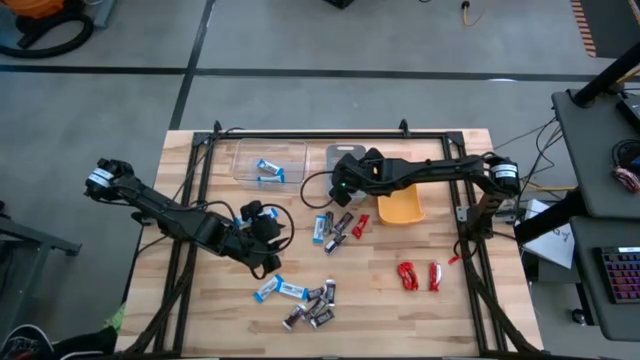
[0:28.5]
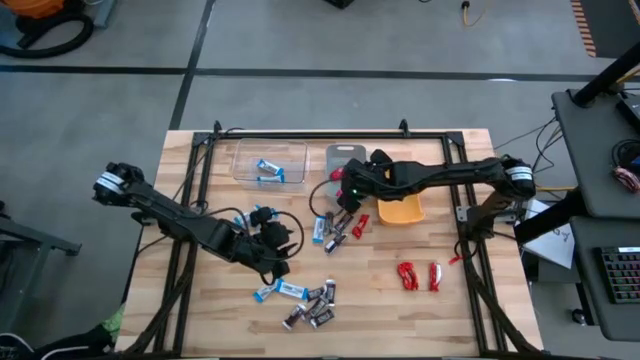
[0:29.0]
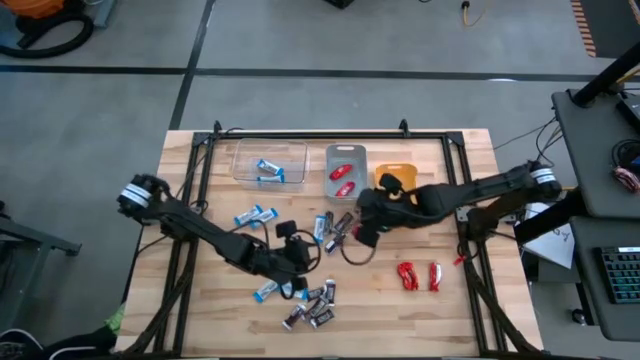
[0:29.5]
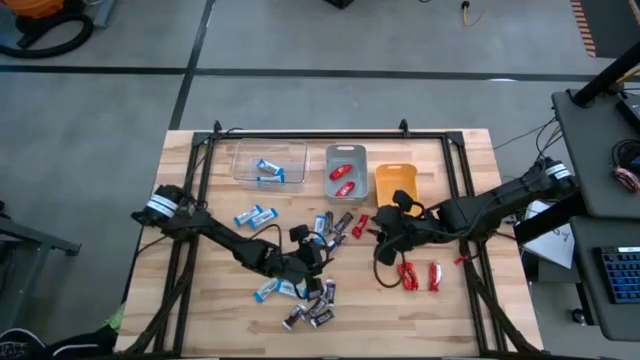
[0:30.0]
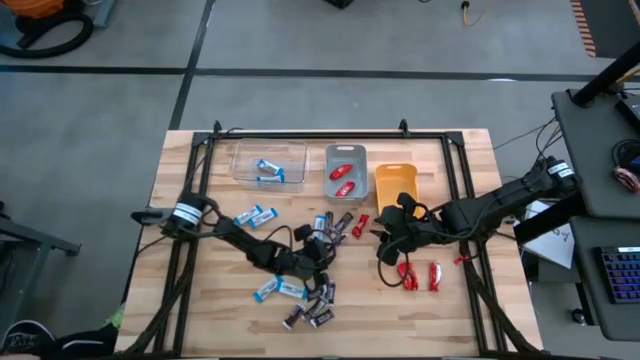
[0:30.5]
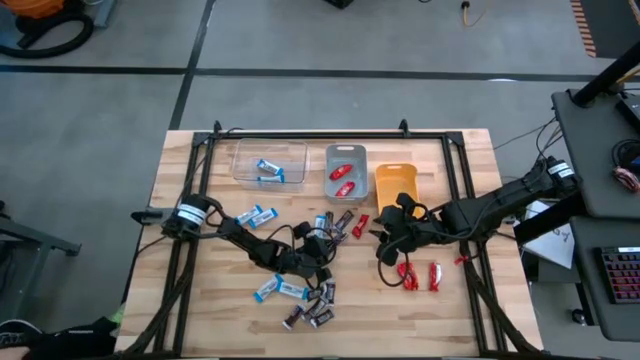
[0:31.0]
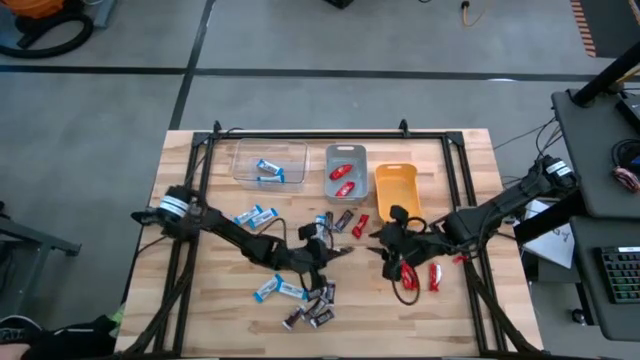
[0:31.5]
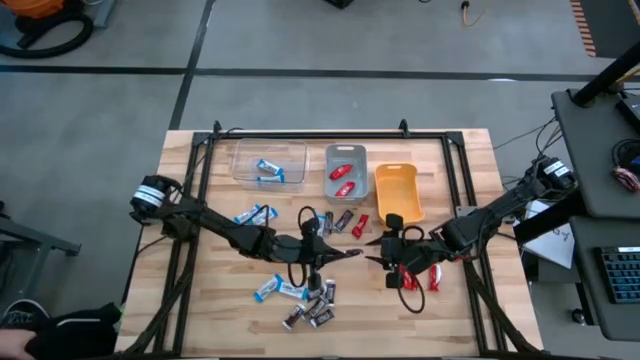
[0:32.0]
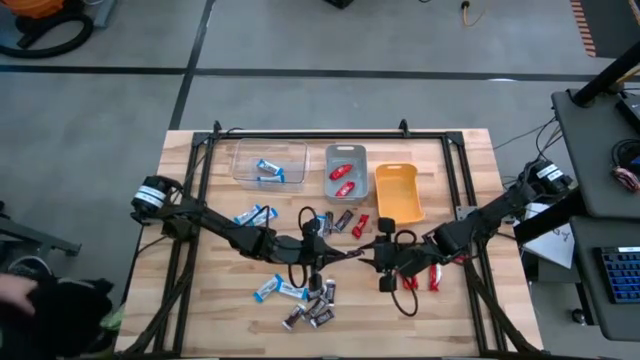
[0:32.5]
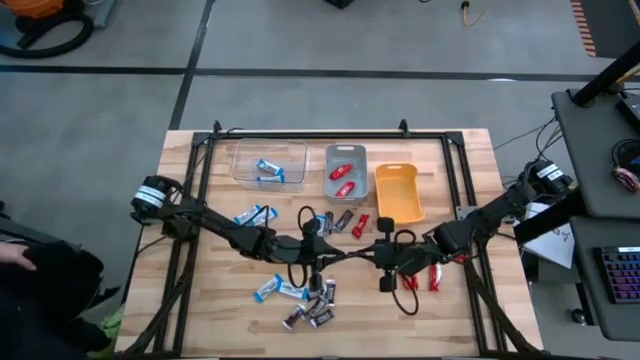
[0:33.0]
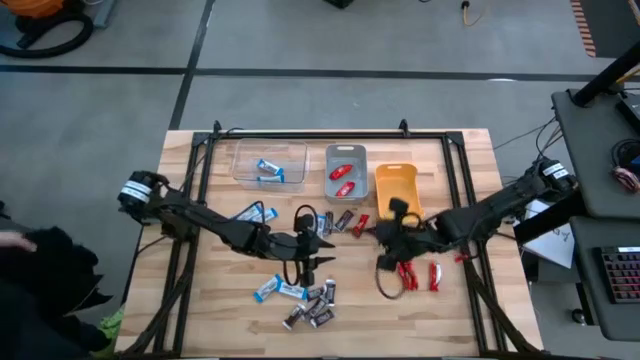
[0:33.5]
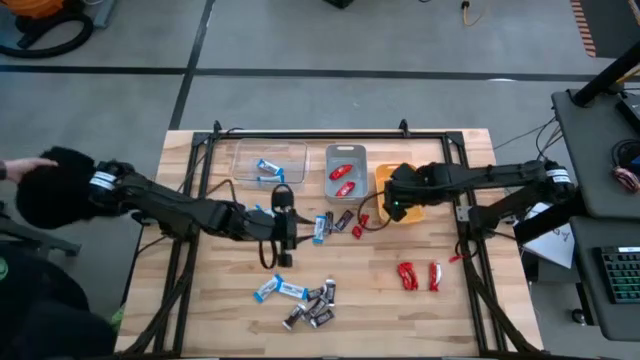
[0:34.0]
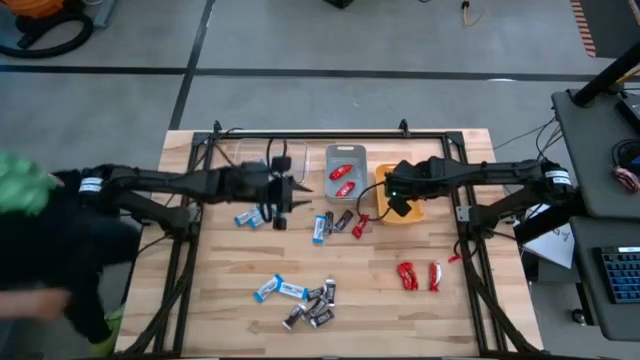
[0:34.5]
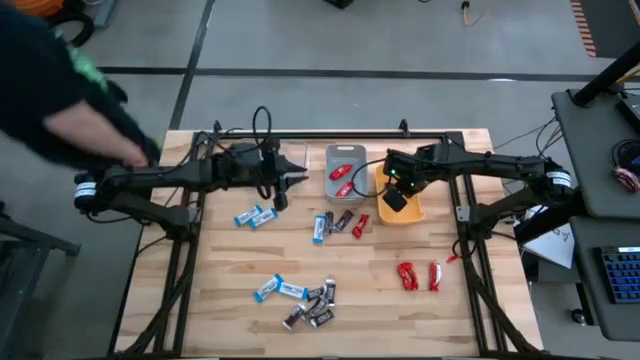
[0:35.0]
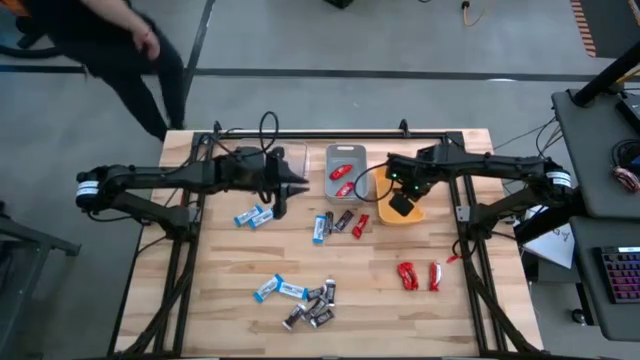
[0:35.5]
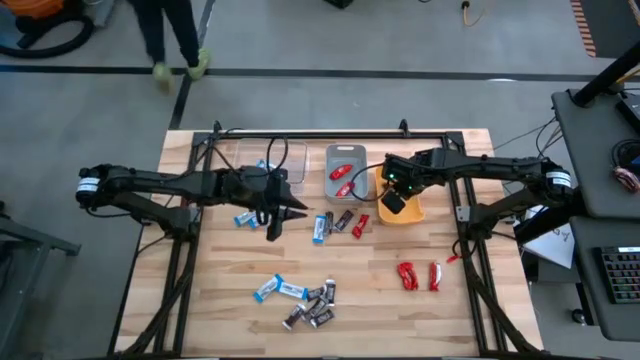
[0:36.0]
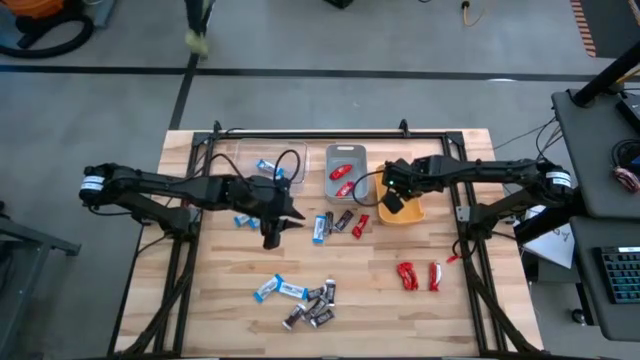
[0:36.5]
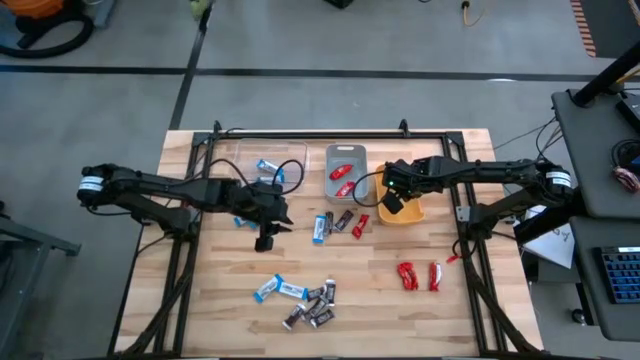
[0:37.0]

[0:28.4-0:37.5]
Task: Organize candy in baskets
Put the brown chocolate into the yellow bin

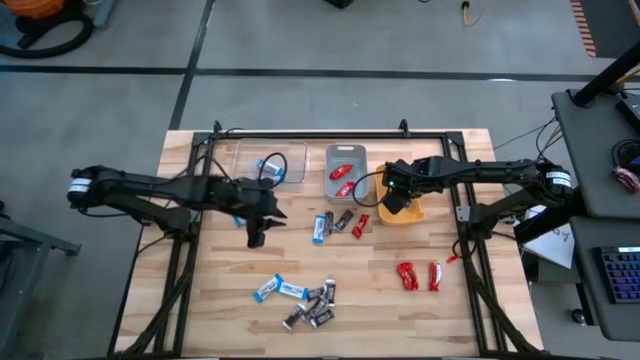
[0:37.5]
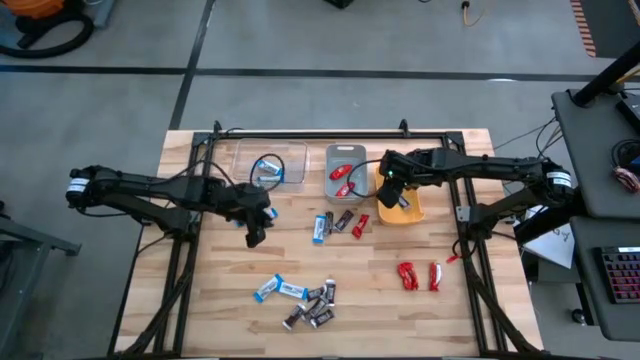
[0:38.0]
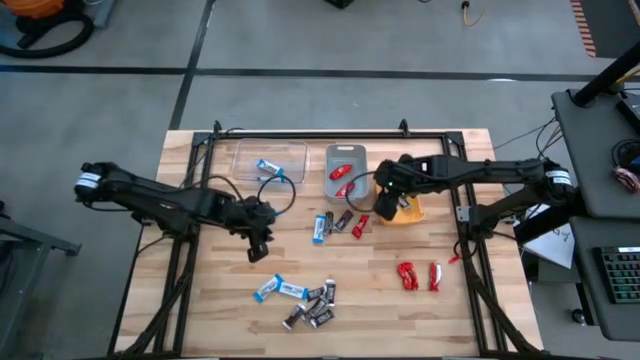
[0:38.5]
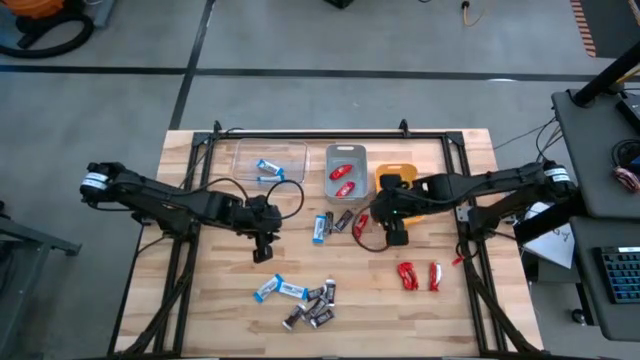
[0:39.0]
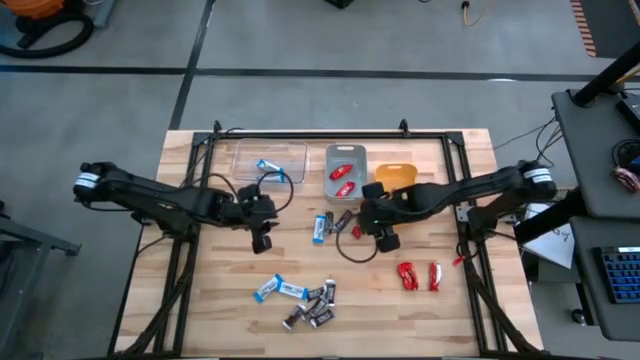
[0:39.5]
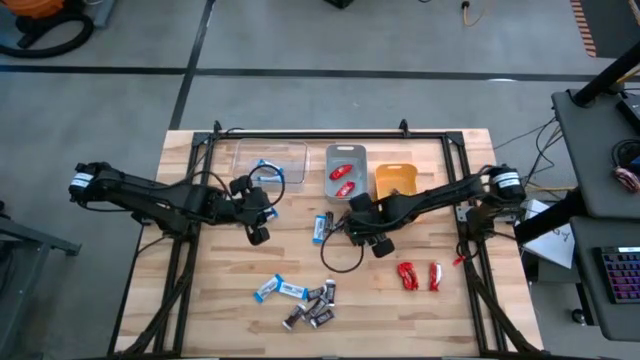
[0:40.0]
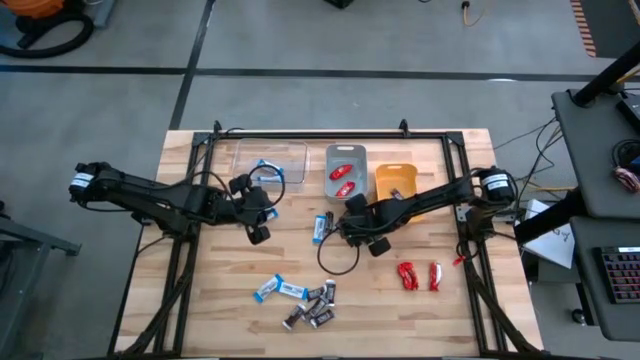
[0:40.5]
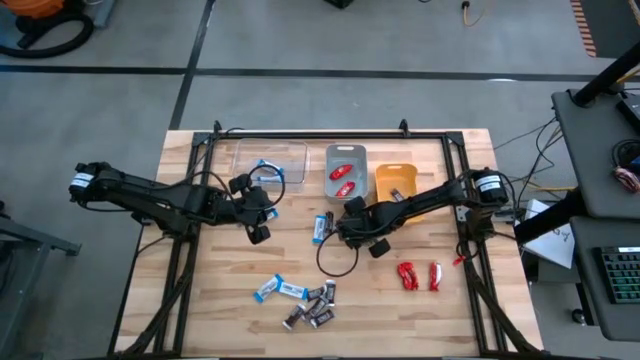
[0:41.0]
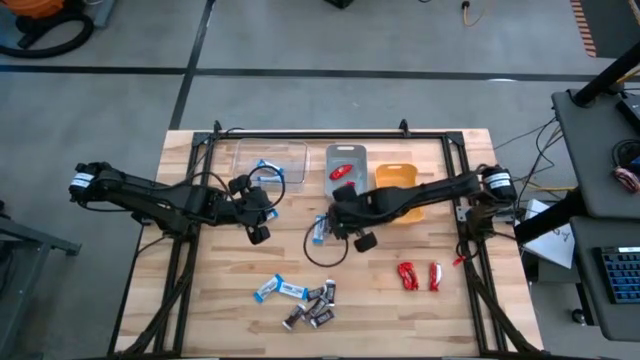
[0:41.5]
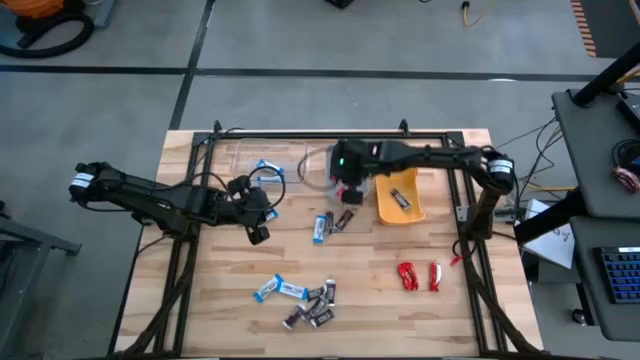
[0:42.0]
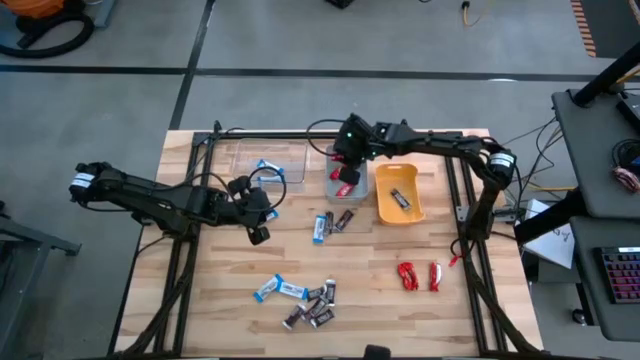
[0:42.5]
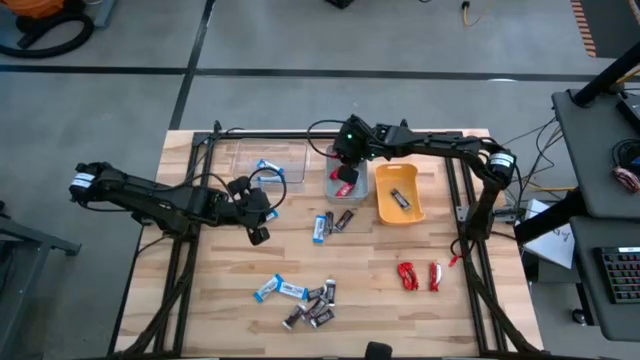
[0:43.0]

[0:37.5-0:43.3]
Put the red chocolate into the gray bin

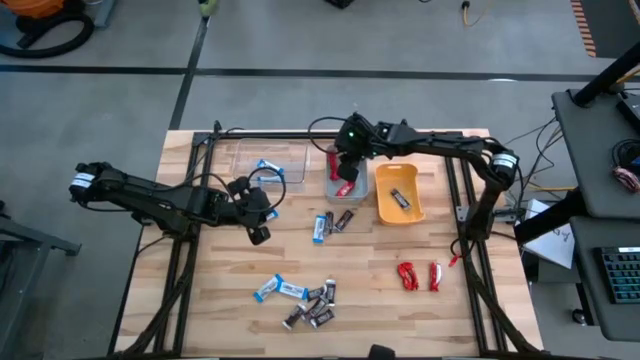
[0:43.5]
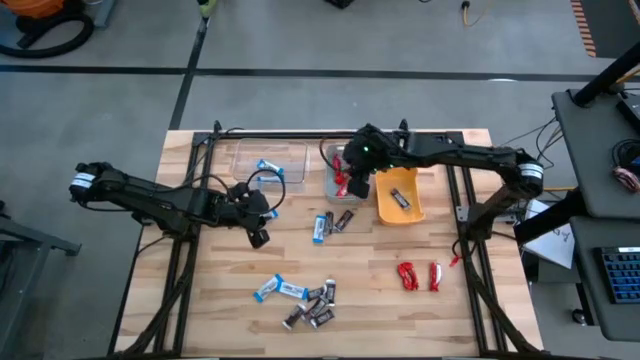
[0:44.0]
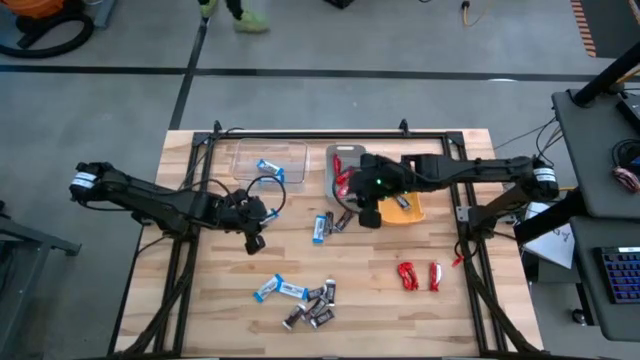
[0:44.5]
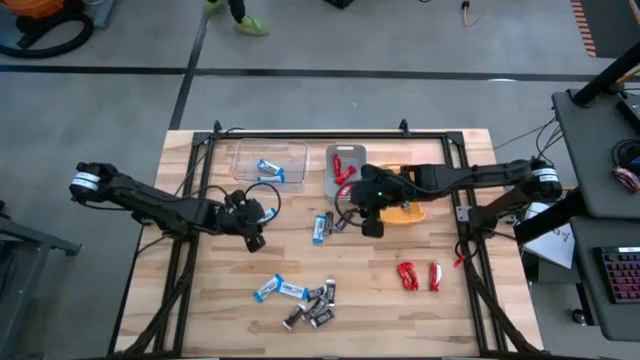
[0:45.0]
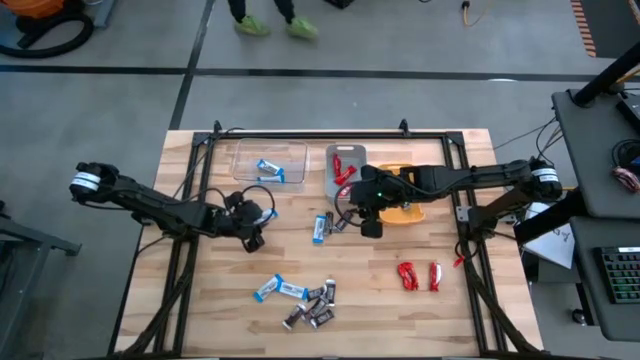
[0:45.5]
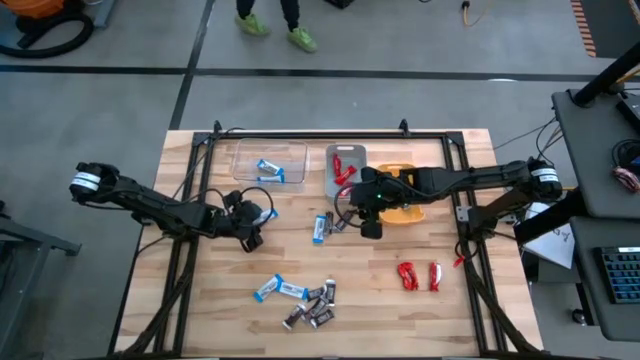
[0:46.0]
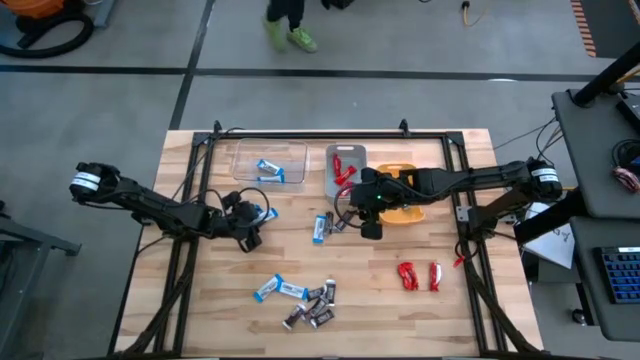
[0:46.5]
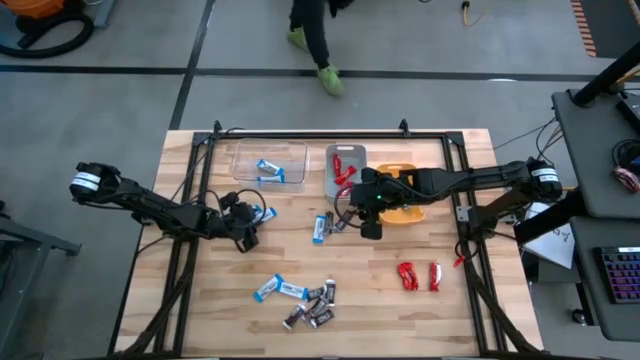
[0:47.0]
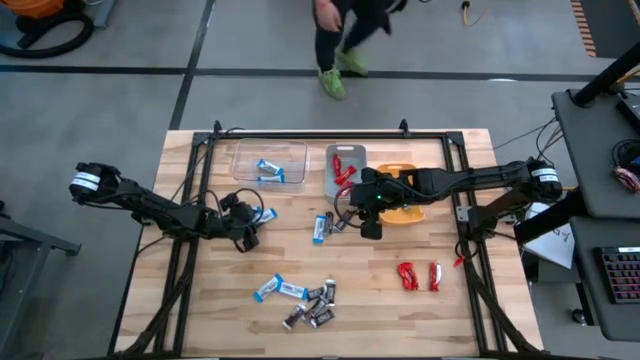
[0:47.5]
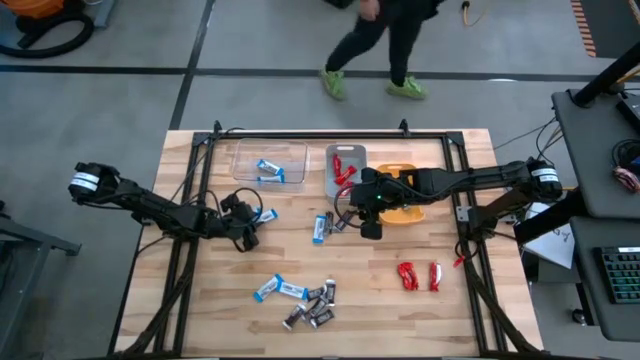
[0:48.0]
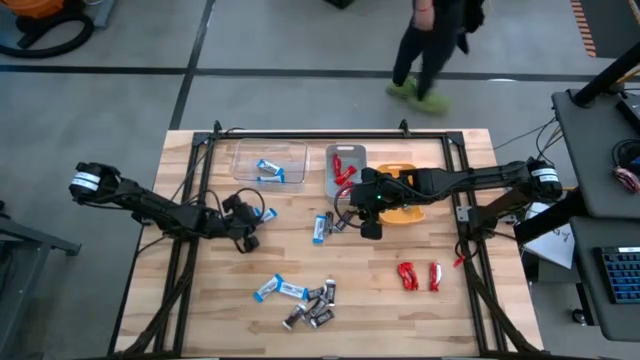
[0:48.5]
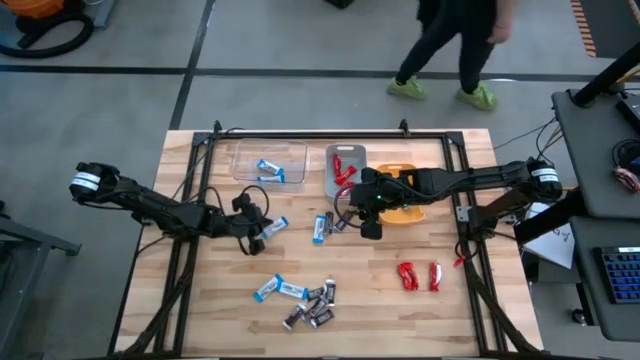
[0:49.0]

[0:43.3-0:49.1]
Put the white chocolate into the transparent bin

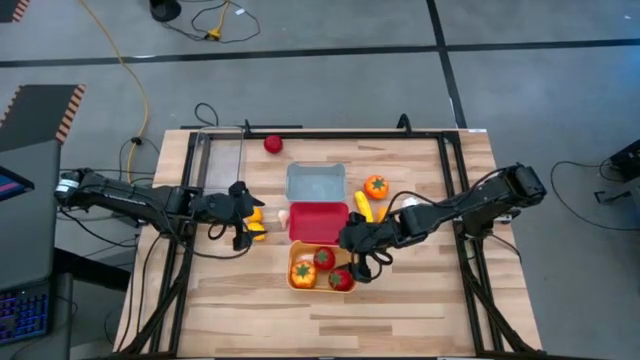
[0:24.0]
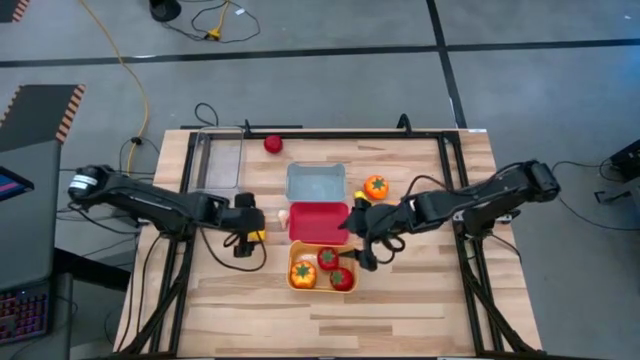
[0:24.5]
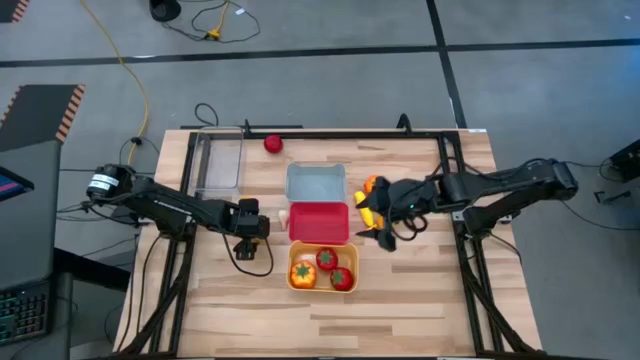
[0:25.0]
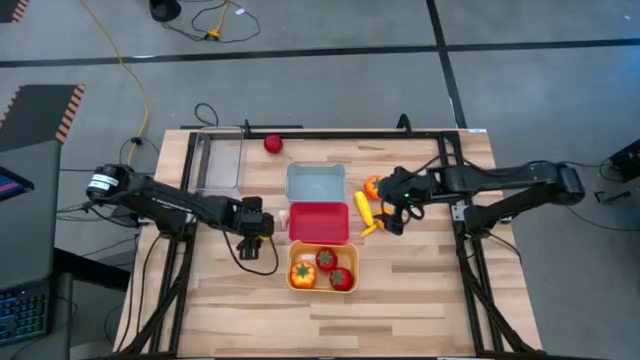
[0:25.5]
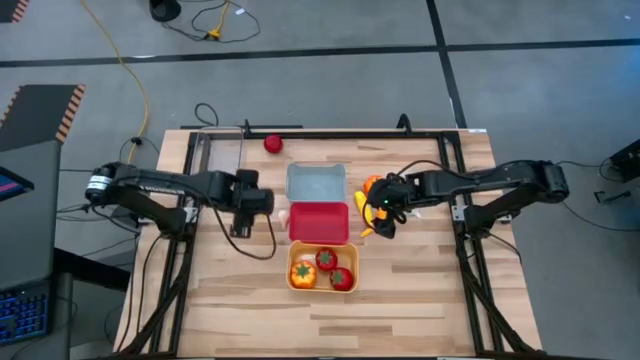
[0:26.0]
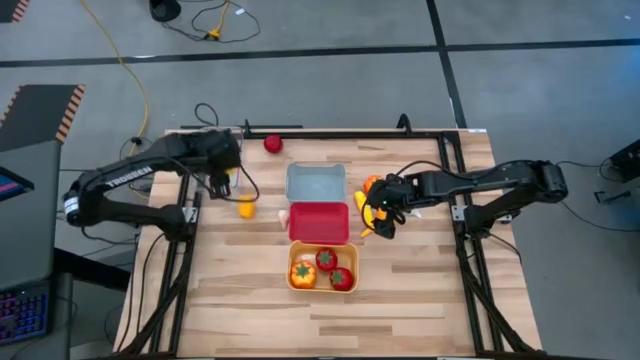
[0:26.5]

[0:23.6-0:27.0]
Task: Sort produce into baskets
Put the bottom left yellow lemon into the transparent bin
